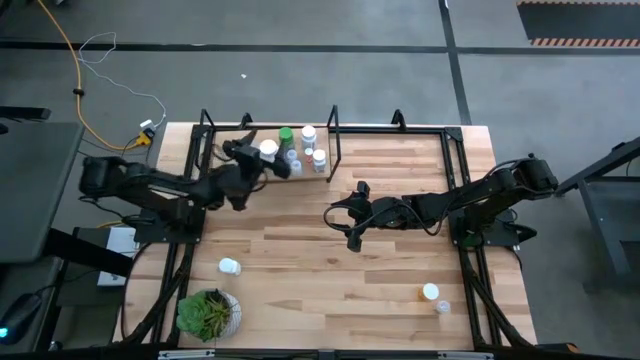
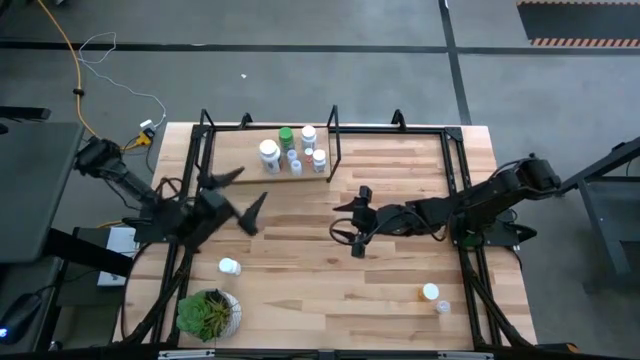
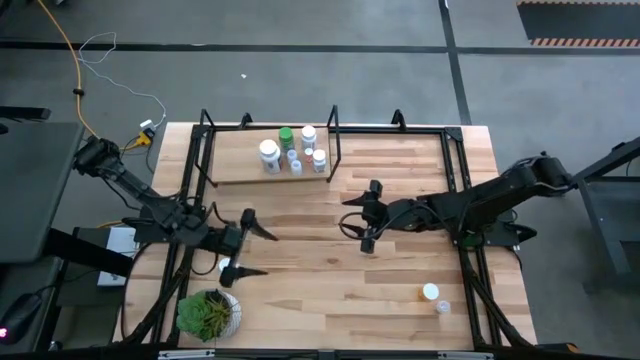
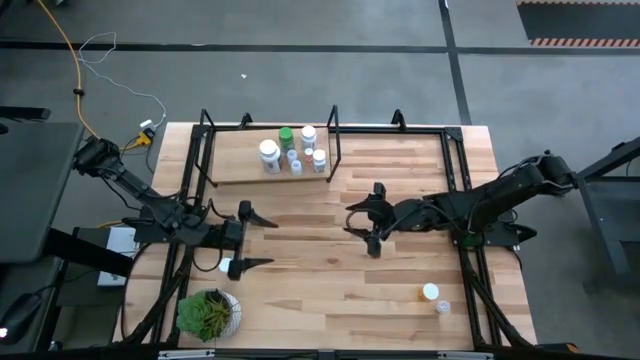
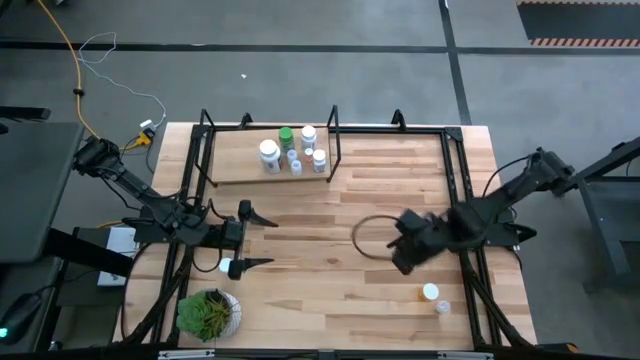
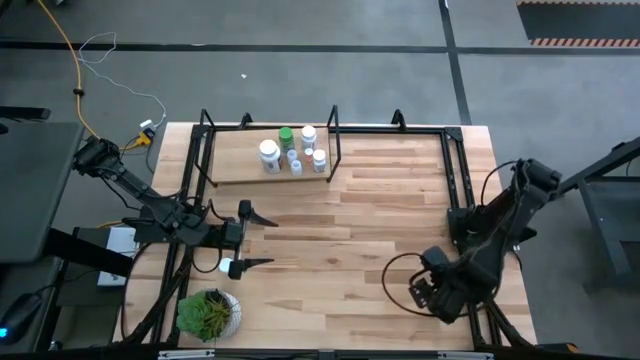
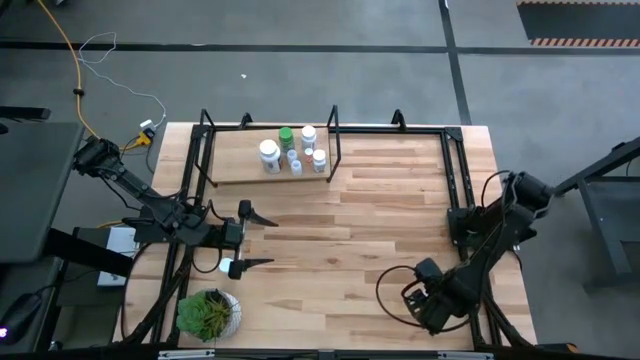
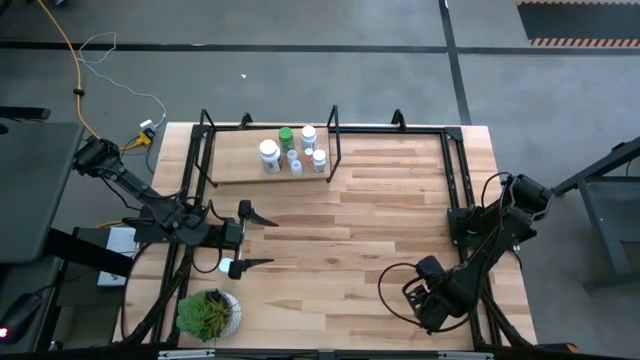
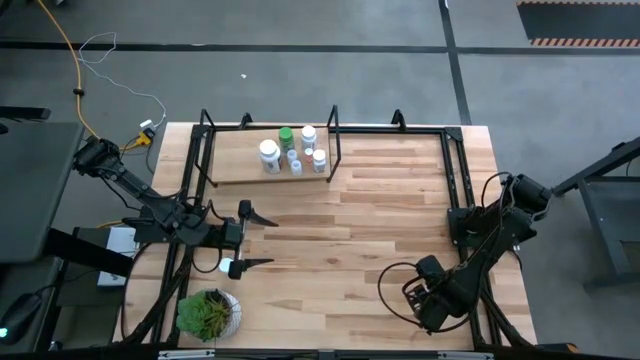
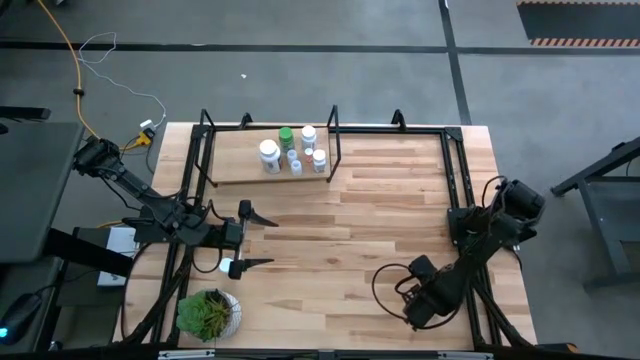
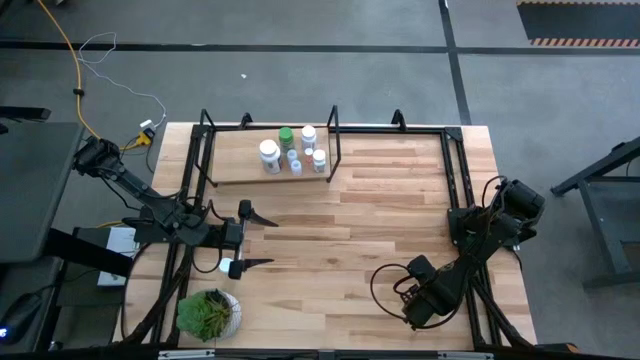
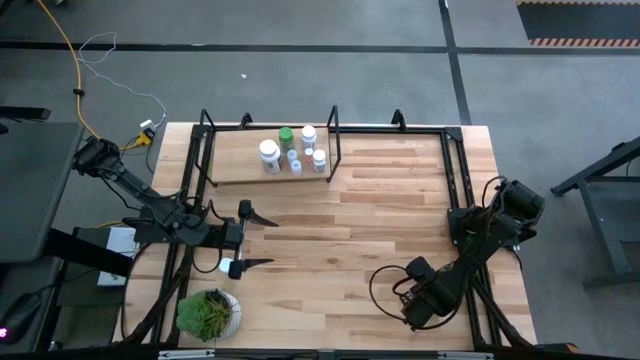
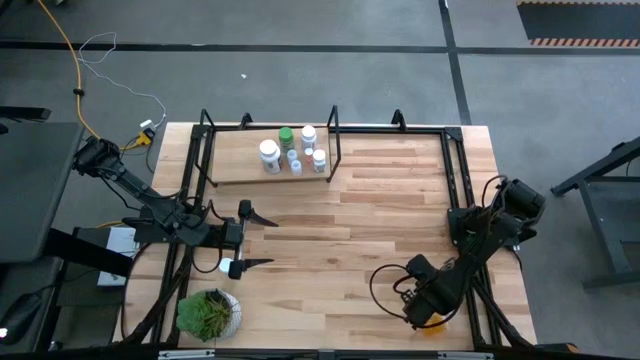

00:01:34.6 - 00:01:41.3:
Task: Pick and place medicine bottles onto shelf by color
Put the orange pill bottle on the shelf

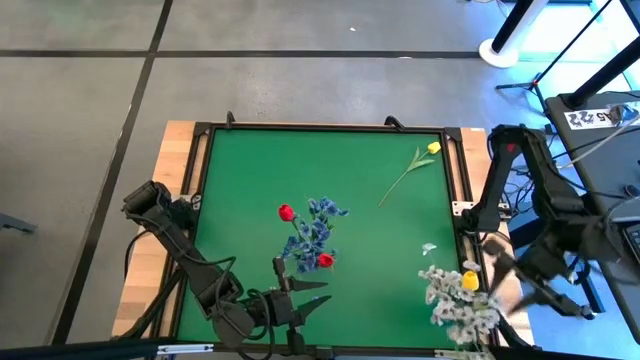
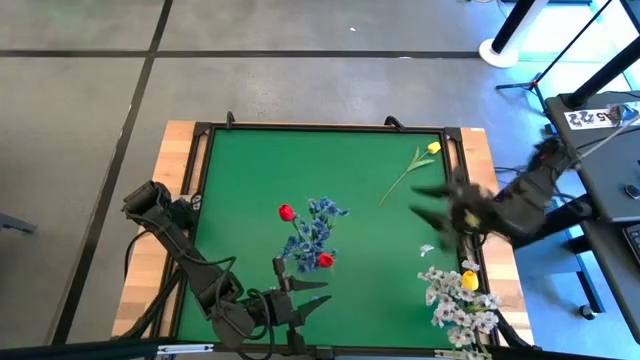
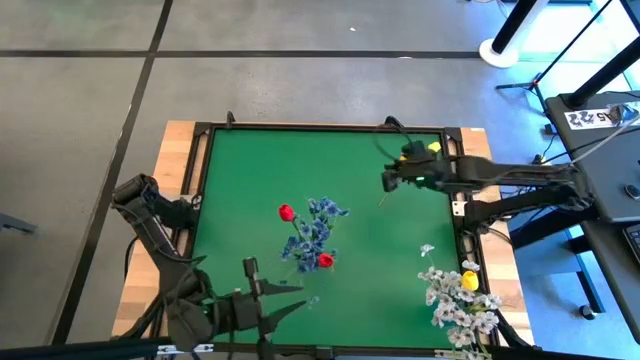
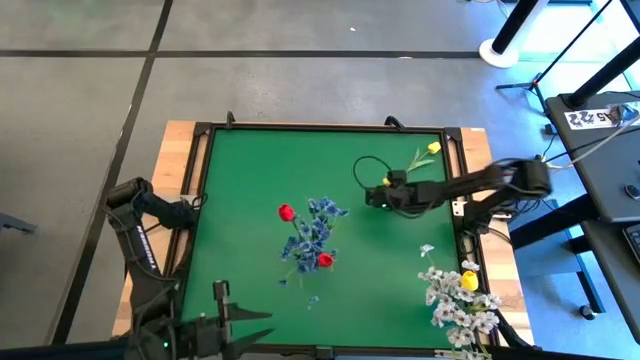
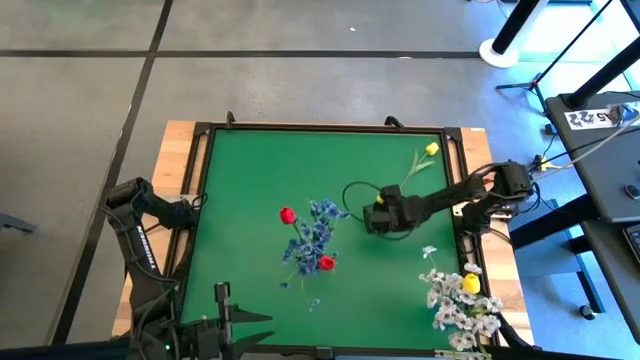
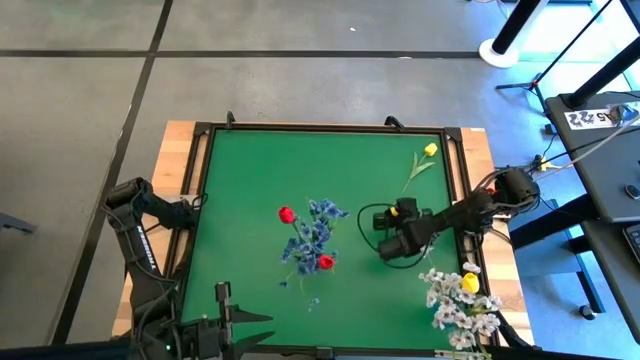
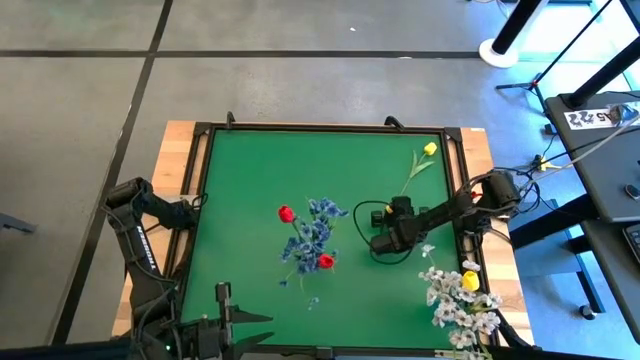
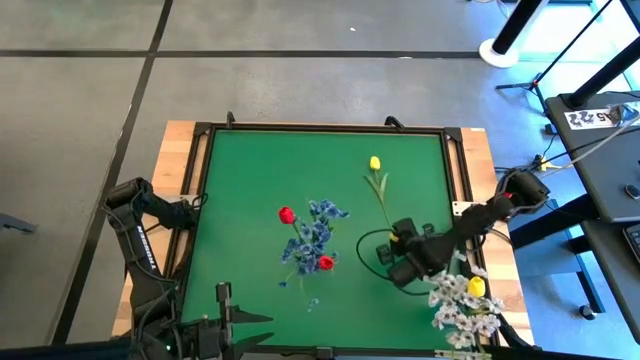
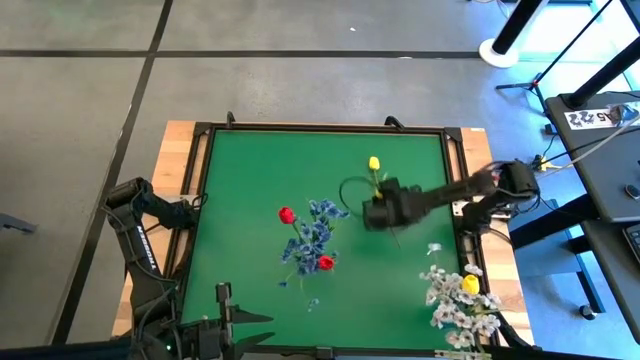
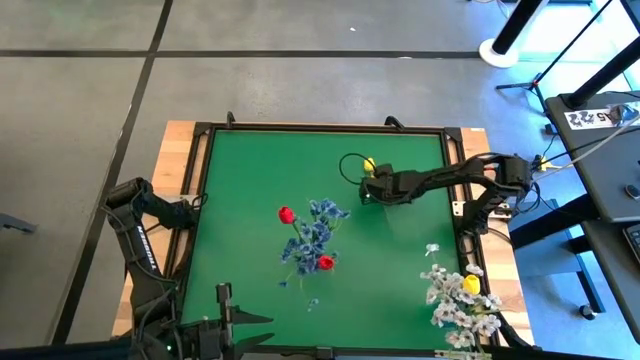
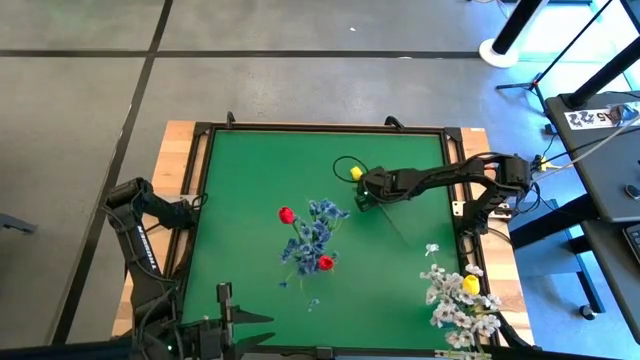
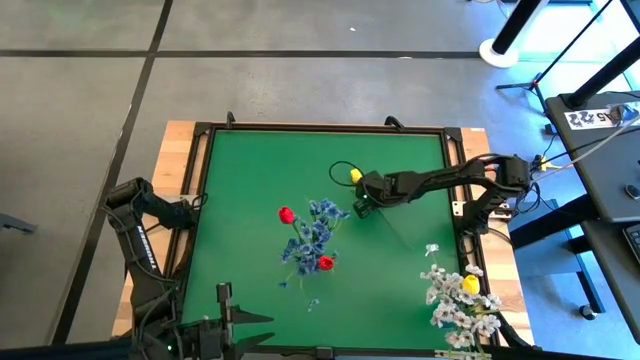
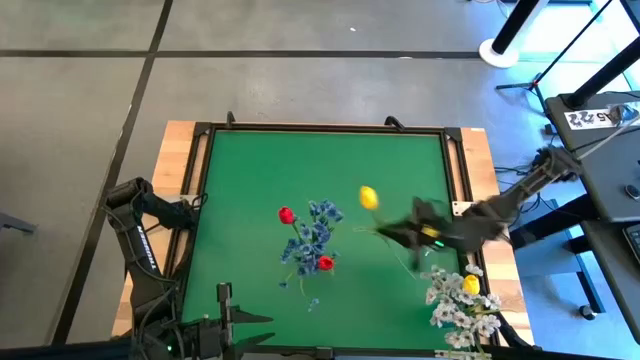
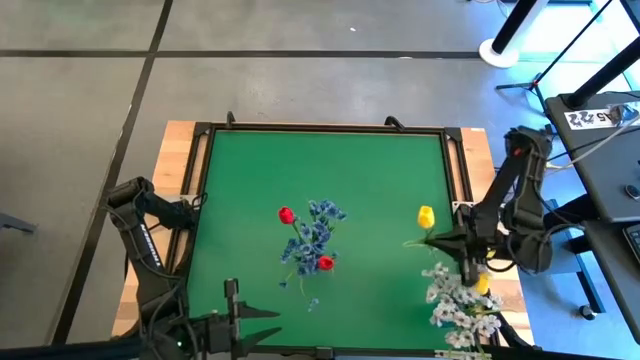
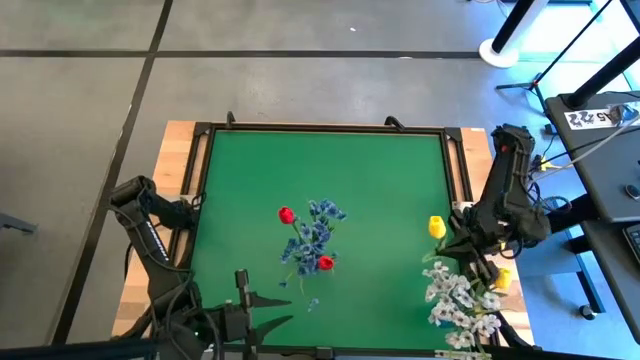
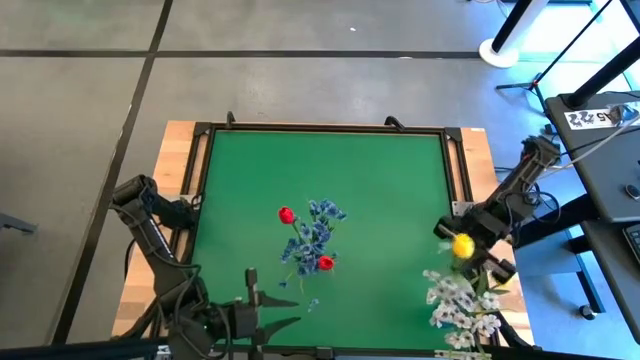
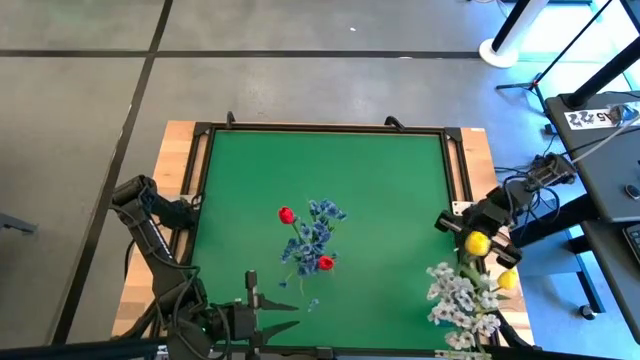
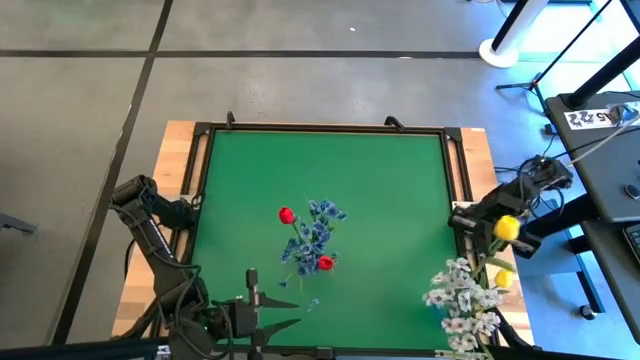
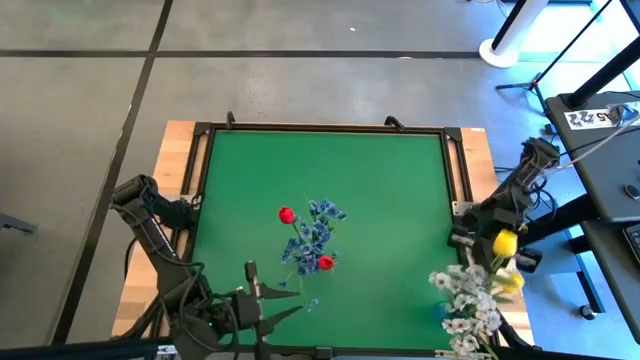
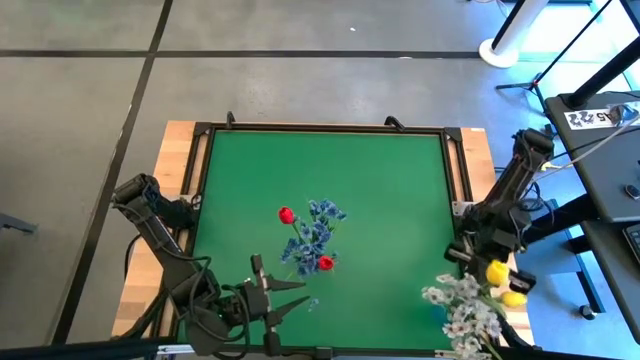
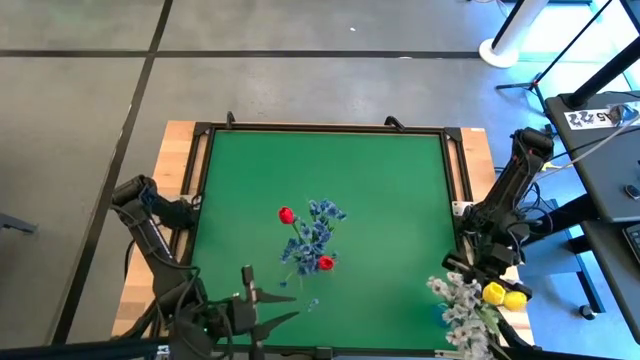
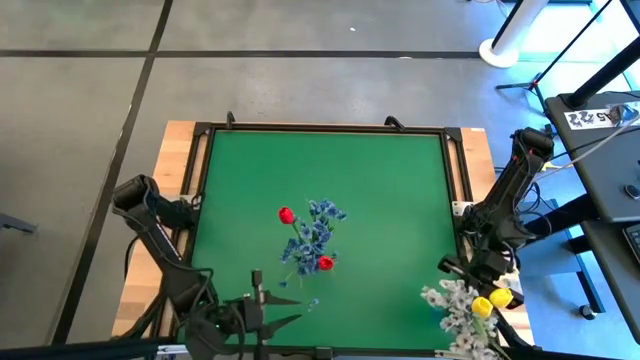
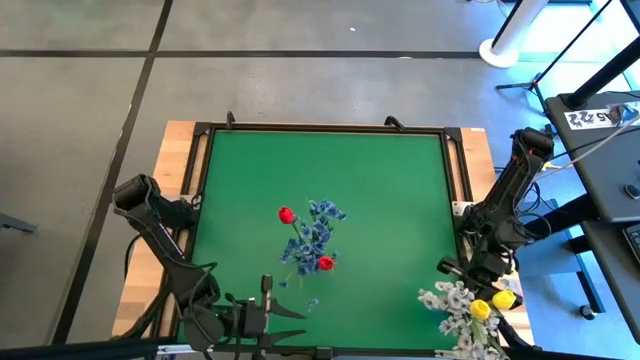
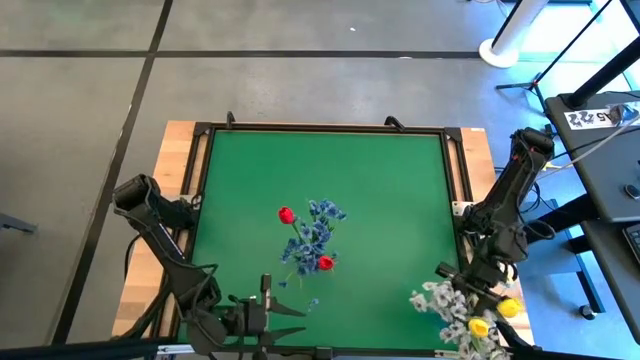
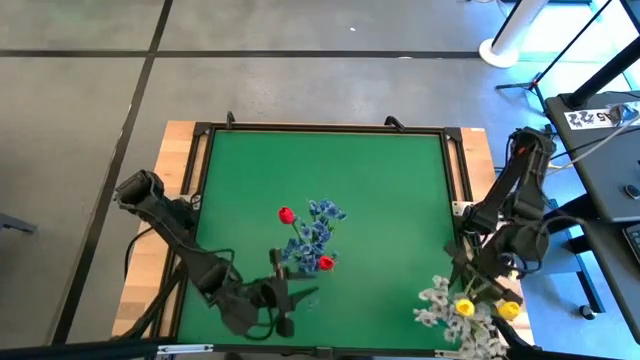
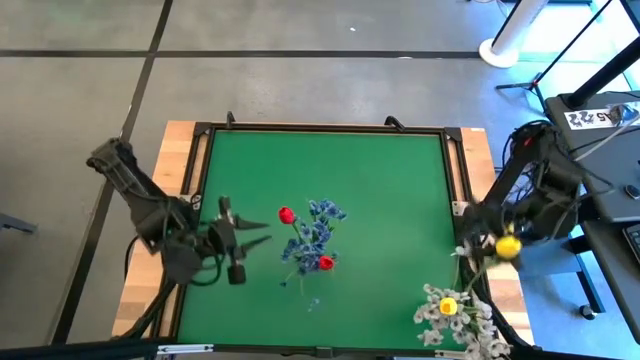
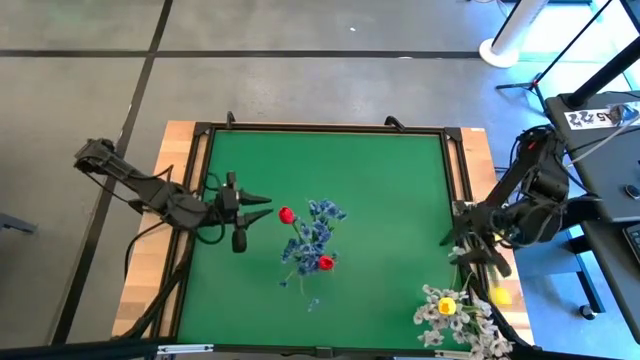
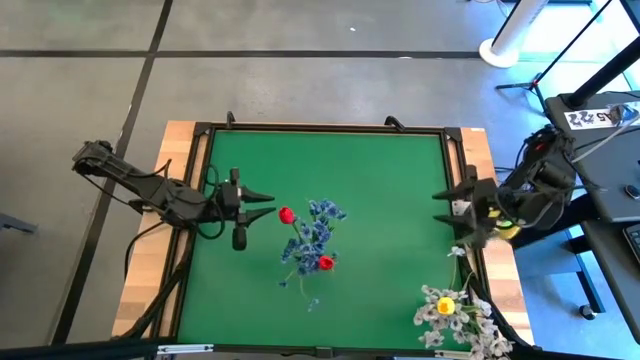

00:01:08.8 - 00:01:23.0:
Task: Sort flowers into vase by color
Put the yellow flower into the blue vase
